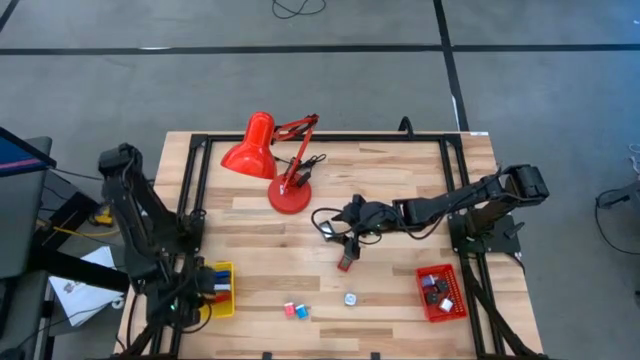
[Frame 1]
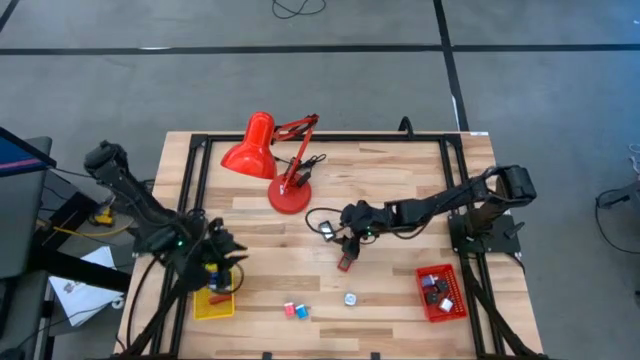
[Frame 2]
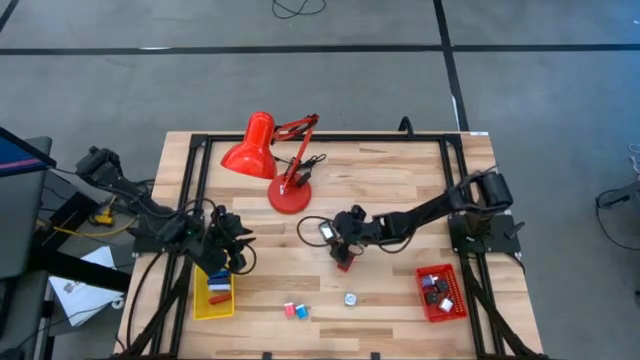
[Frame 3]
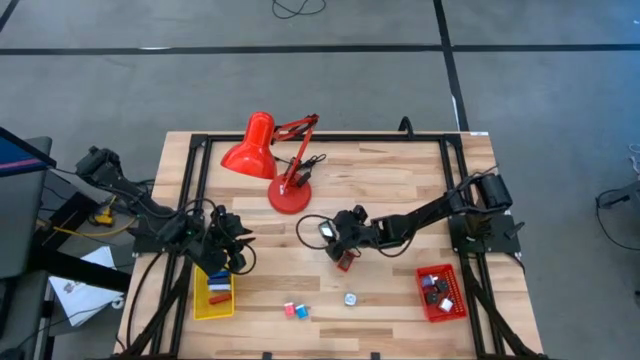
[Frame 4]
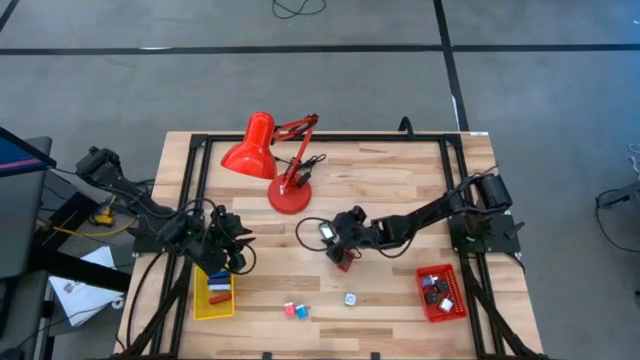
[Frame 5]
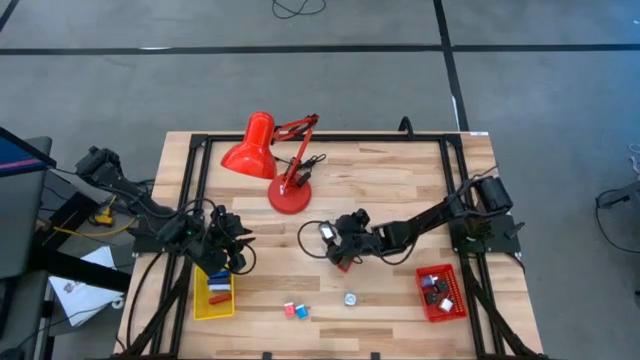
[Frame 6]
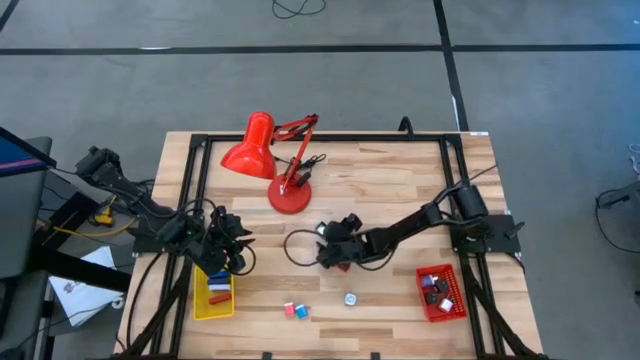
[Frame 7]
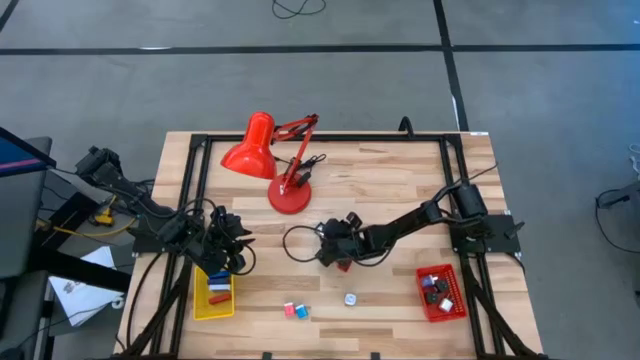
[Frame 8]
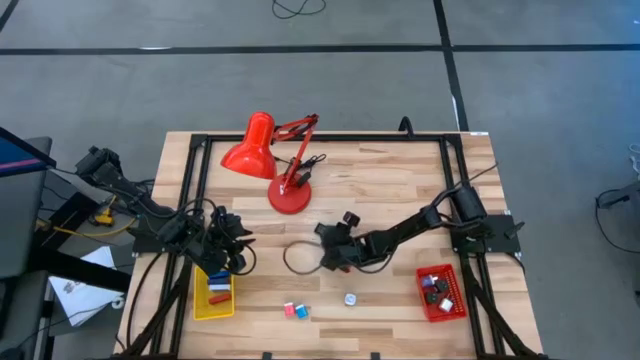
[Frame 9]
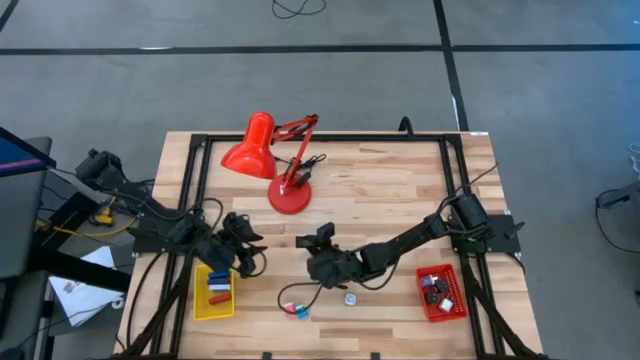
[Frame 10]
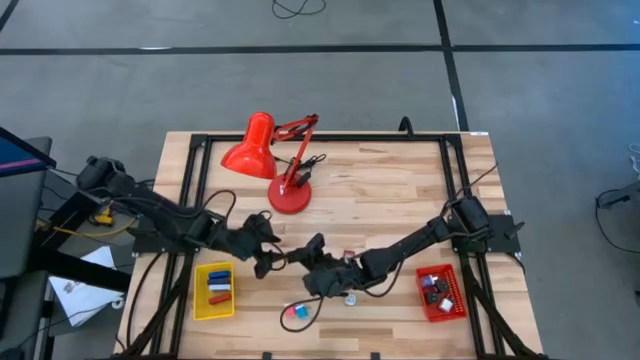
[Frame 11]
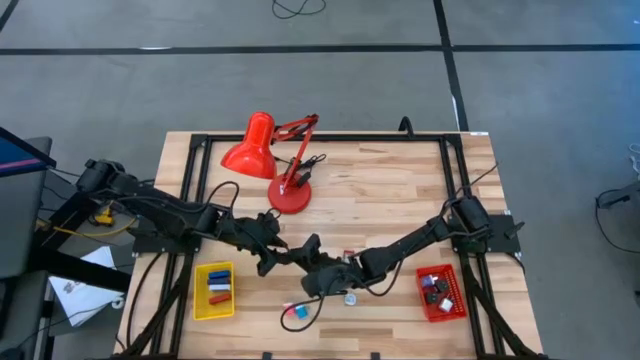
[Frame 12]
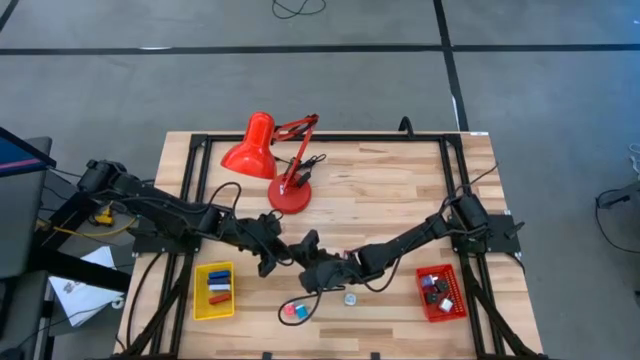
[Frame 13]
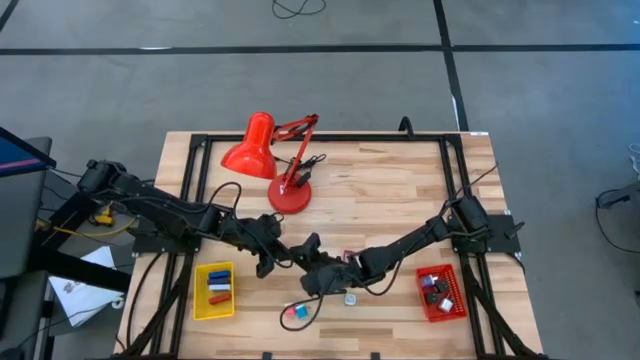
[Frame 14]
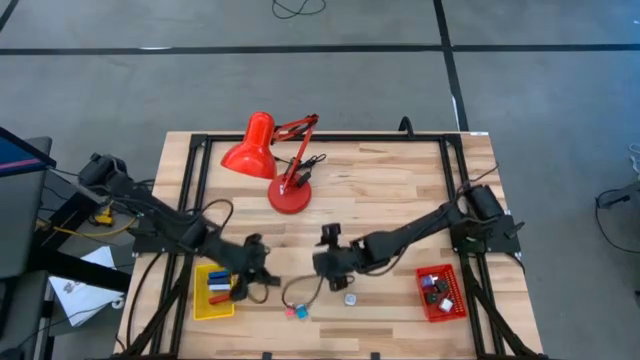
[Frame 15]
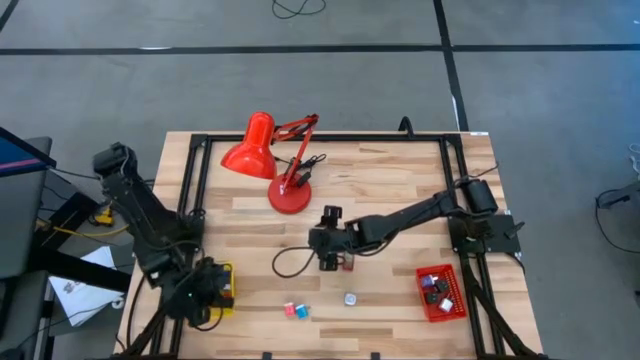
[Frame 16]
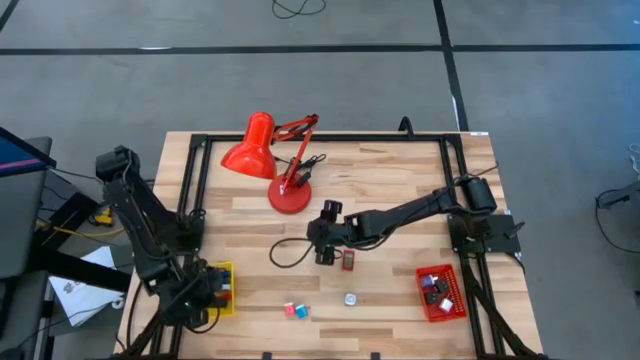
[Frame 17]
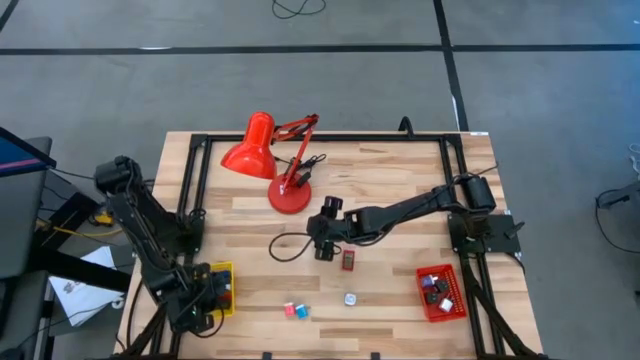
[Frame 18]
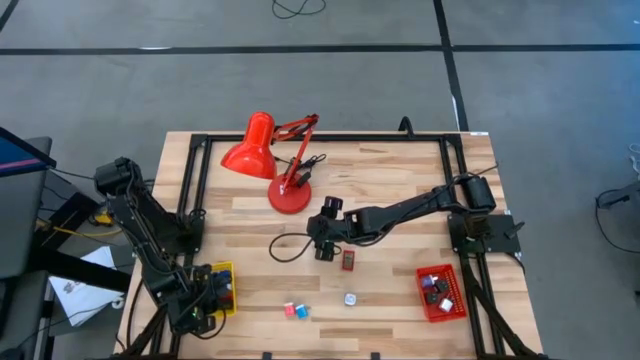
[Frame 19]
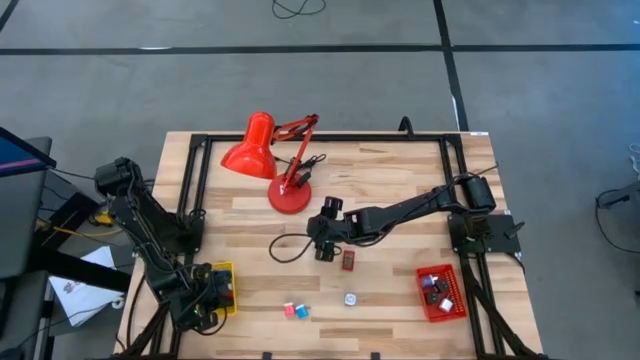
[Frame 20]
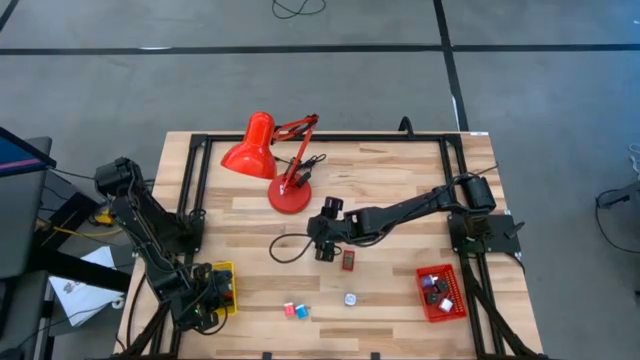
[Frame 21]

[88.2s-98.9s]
Task: Pick & Place Office items
Put the black digital timer into the yellow bin

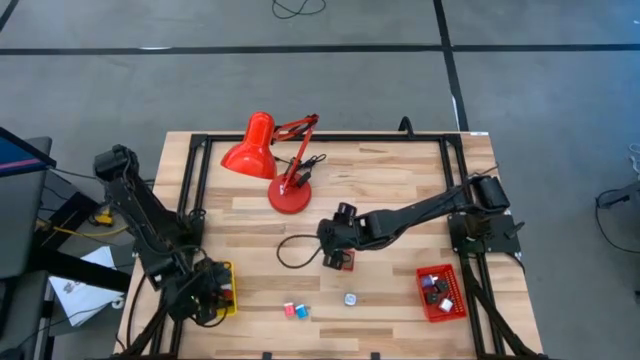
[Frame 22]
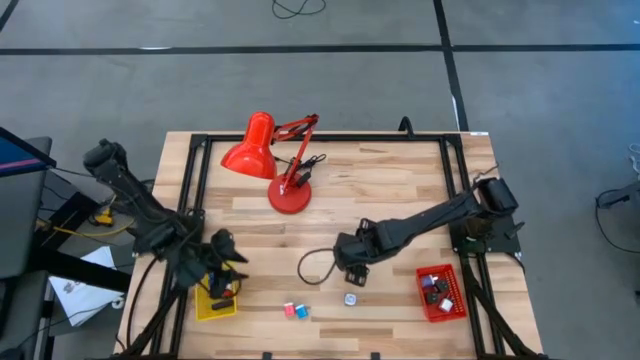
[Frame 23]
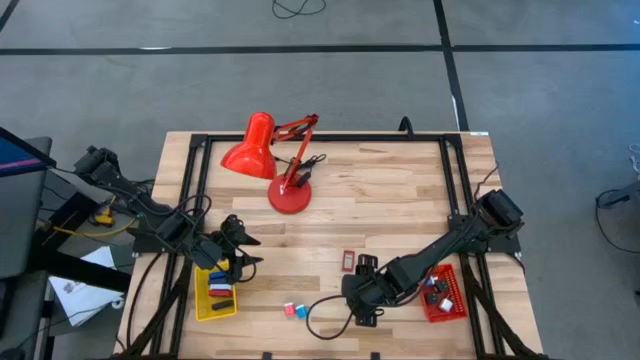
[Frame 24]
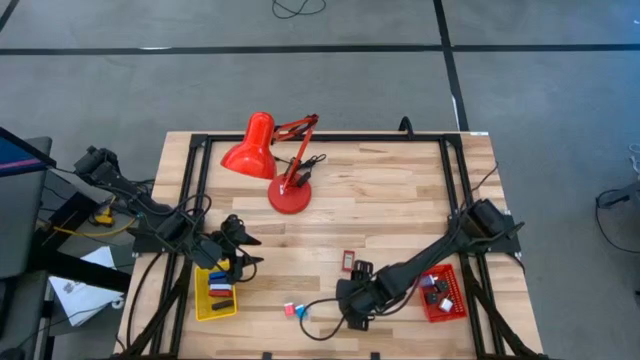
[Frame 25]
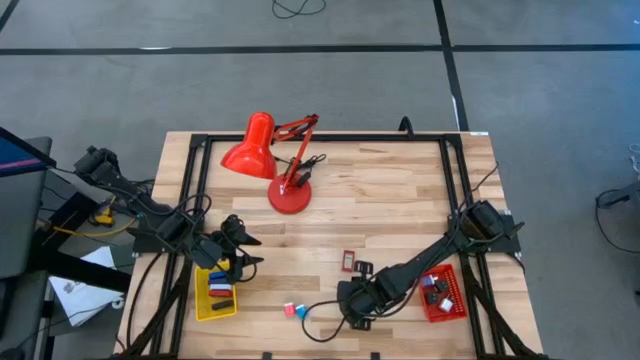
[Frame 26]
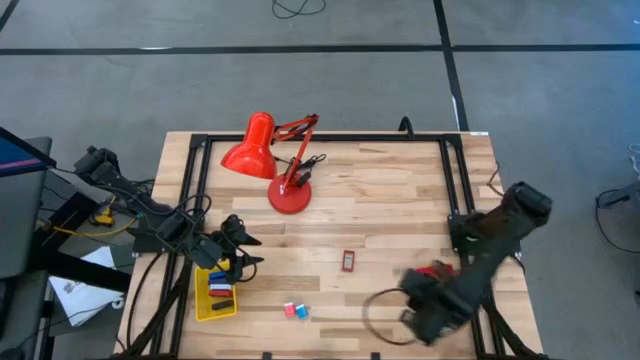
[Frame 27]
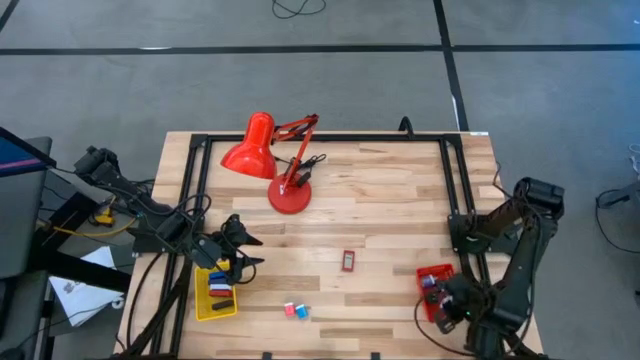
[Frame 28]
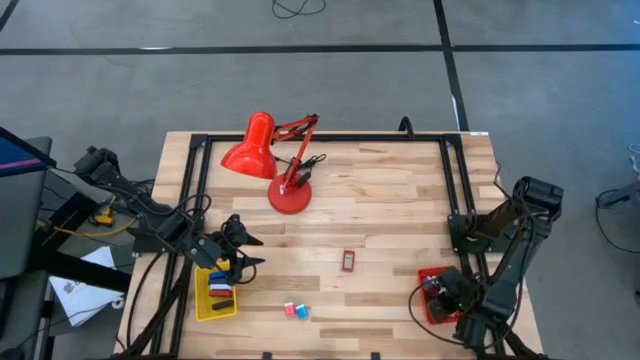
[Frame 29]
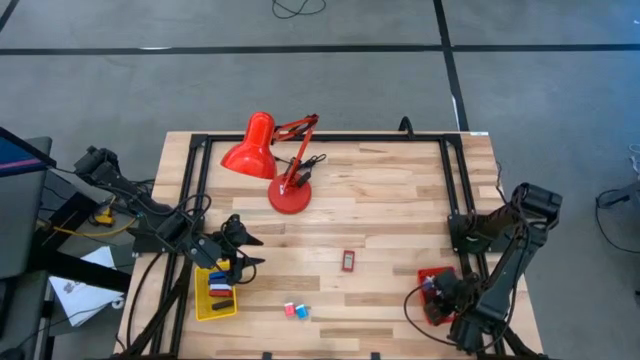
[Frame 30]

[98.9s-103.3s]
Put the right light blue charger adapter into the red bin

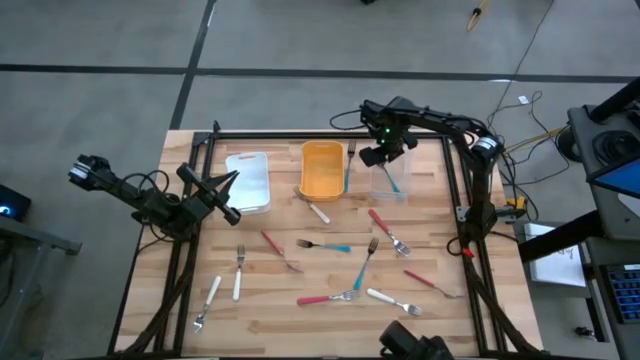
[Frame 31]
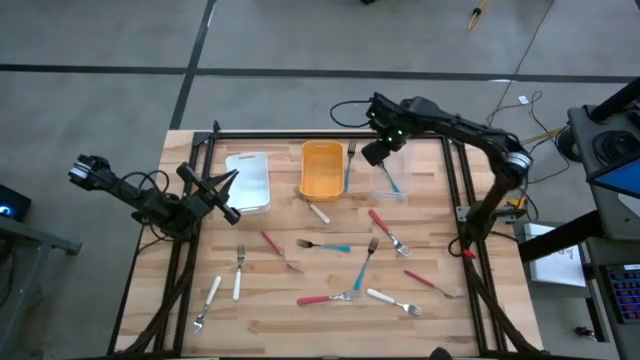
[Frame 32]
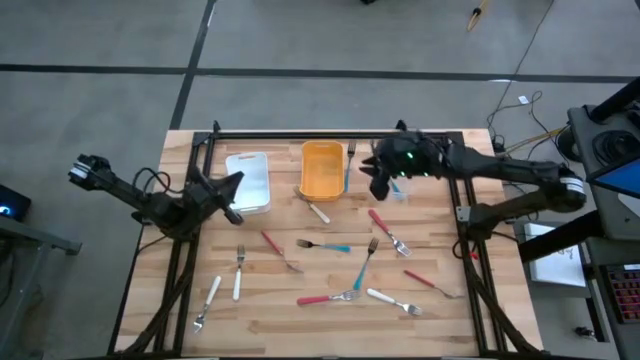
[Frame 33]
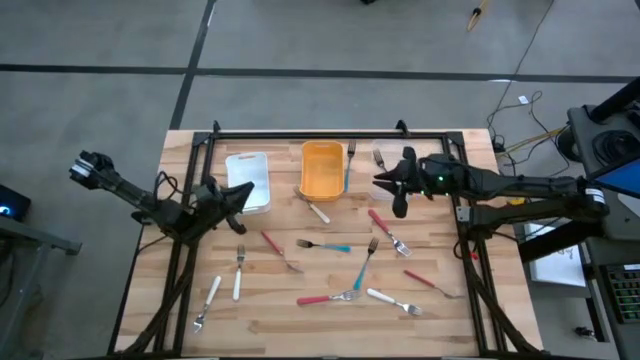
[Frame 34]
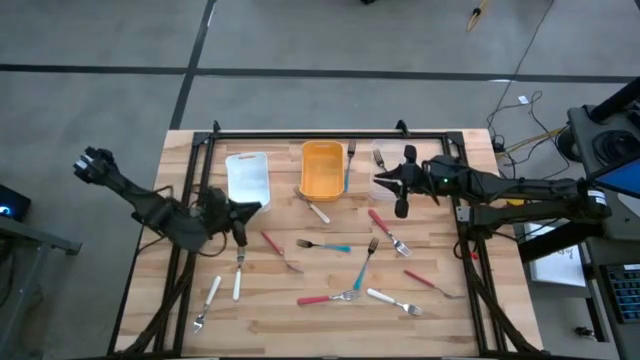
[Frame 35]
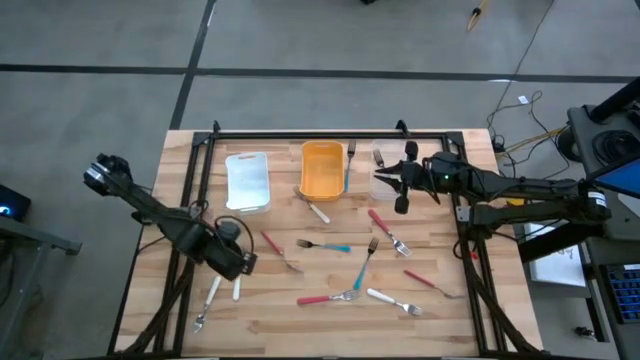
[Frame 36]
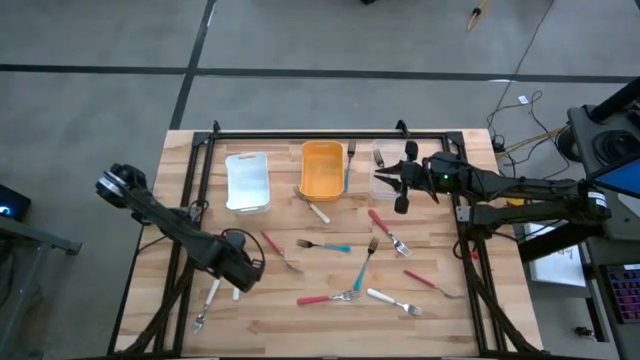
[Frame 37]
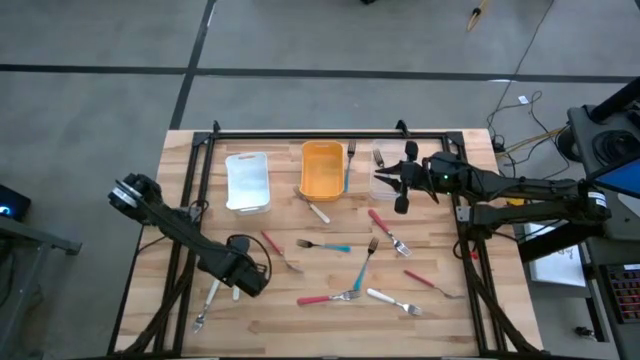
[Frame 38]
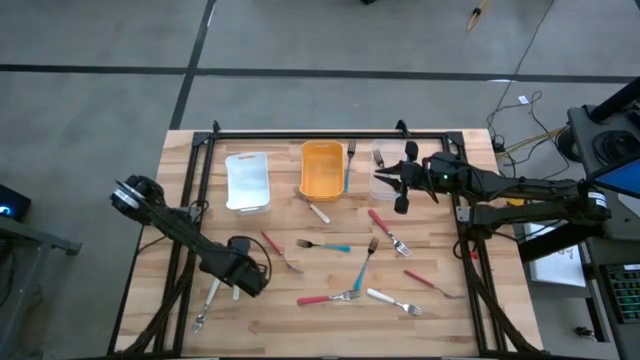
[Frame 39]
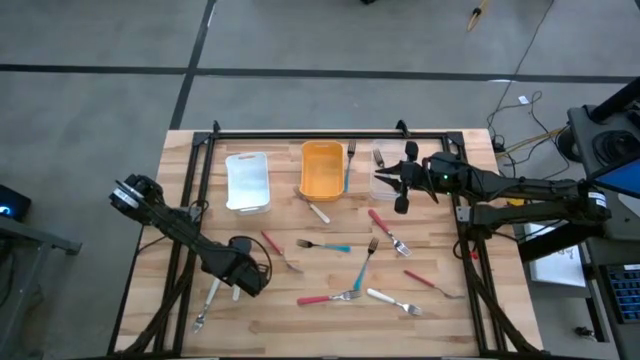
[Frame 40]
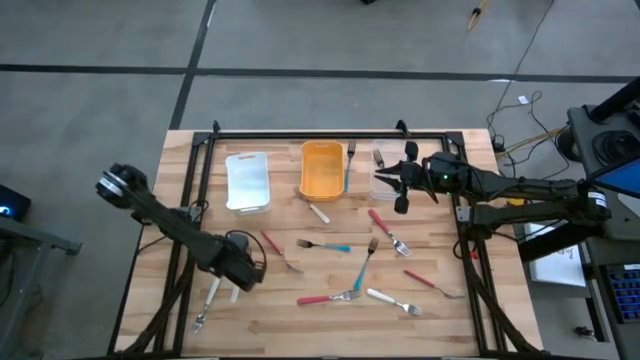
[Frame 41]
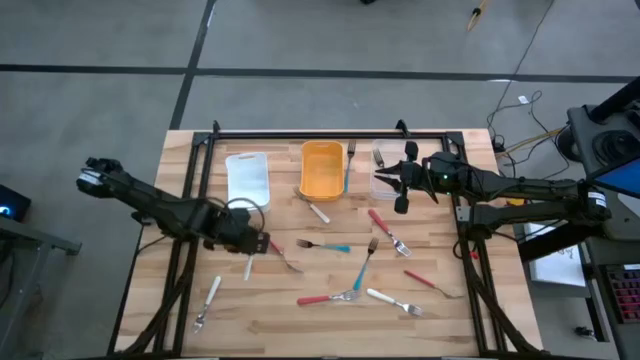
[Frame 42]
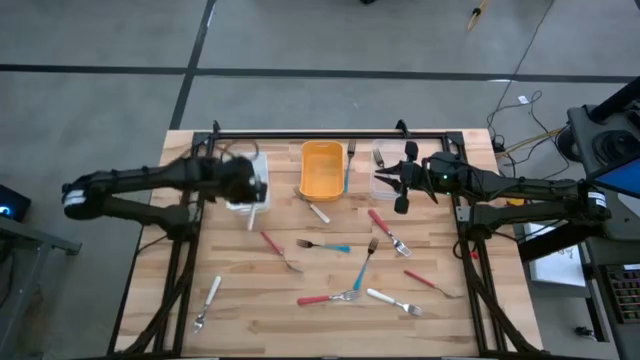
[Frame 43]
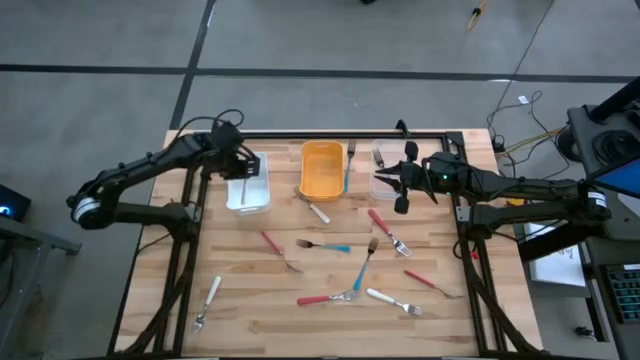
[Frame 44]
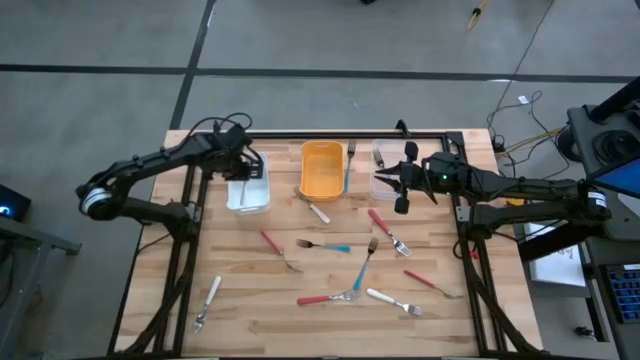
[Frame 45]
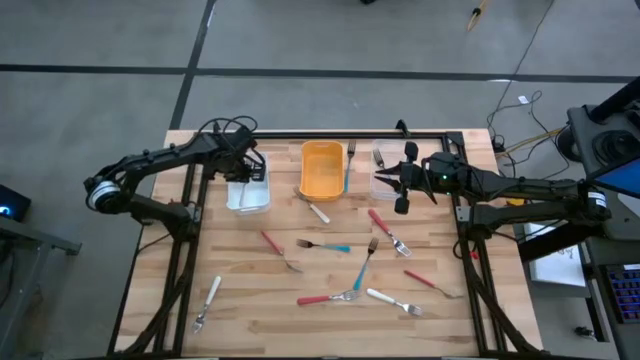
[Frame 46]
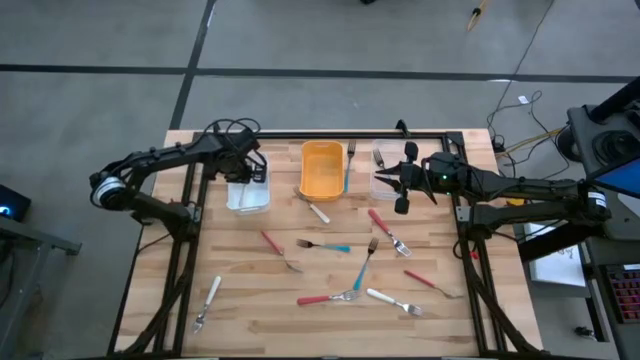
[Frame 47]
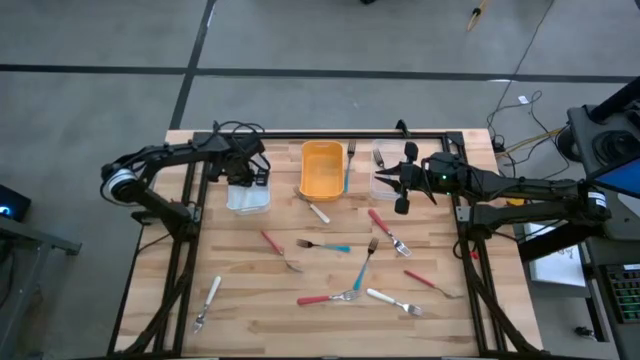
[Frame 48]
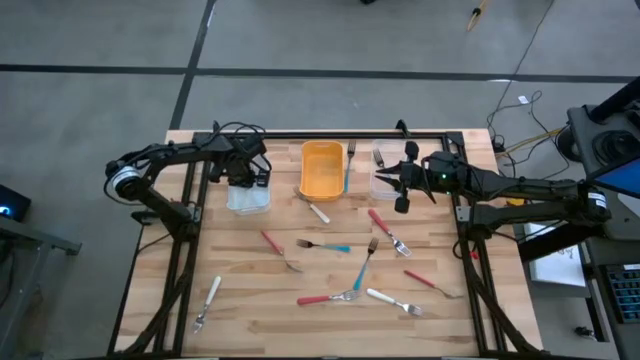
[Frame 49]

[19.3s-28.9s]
Task: Sort silverware by color (type)
Put the white fork into the white bin
